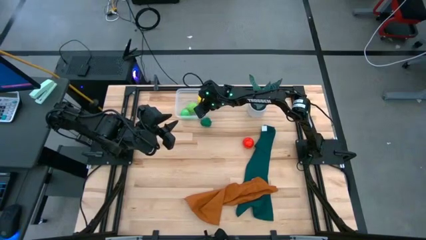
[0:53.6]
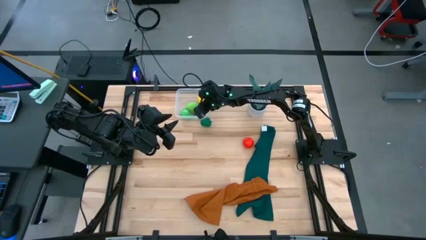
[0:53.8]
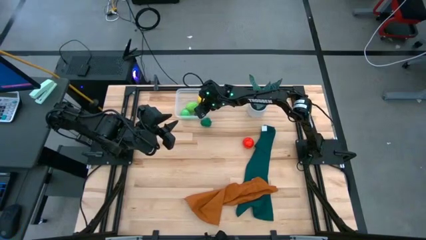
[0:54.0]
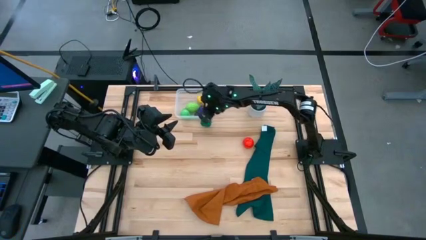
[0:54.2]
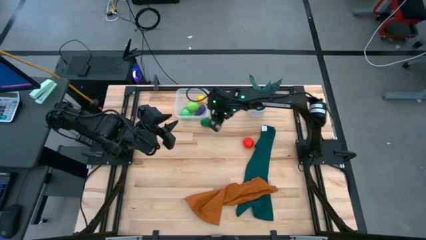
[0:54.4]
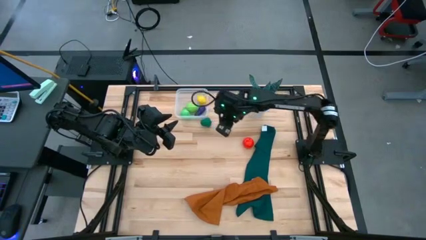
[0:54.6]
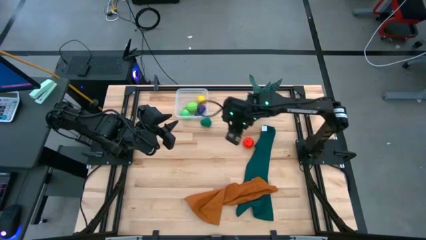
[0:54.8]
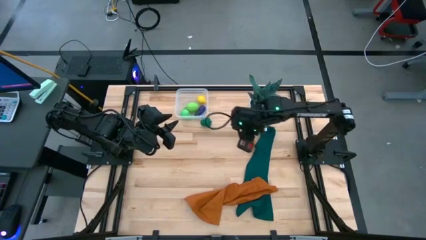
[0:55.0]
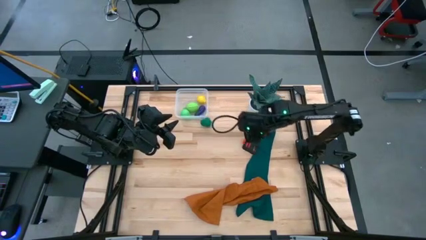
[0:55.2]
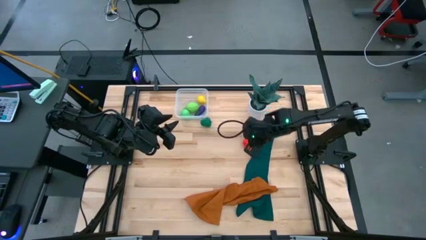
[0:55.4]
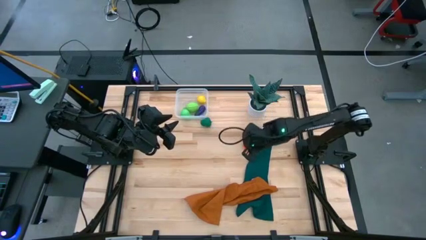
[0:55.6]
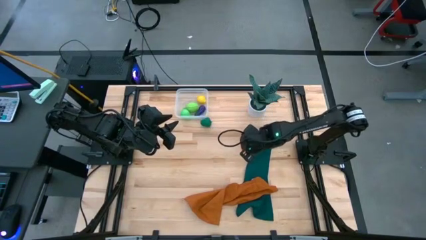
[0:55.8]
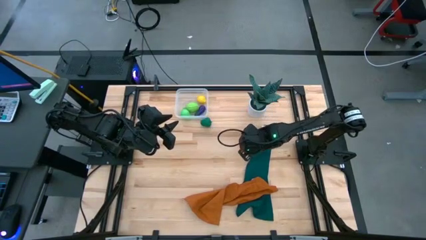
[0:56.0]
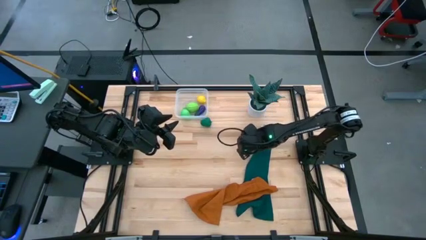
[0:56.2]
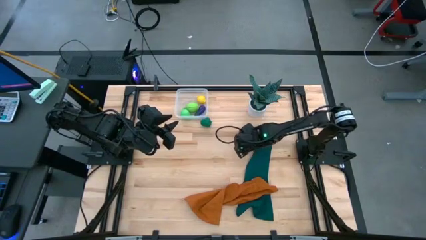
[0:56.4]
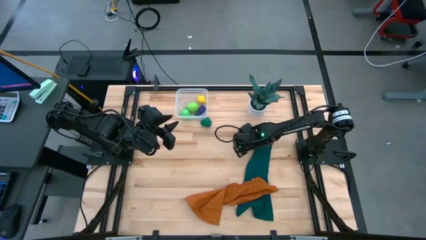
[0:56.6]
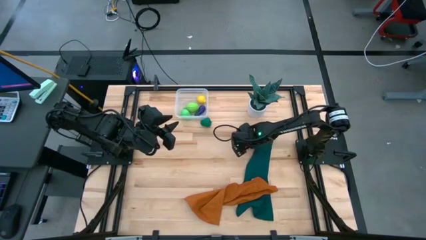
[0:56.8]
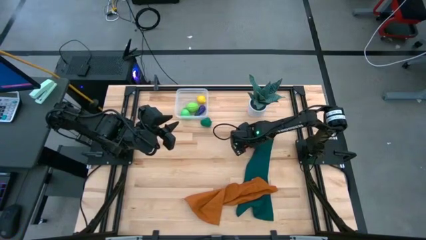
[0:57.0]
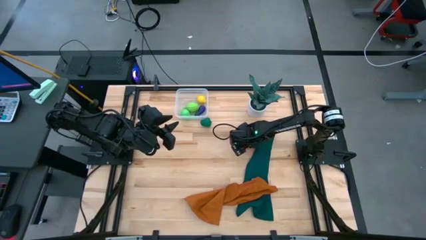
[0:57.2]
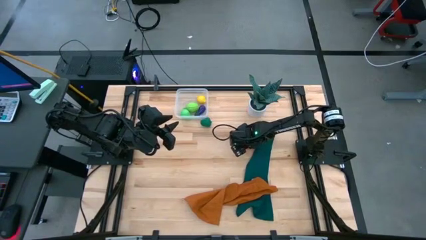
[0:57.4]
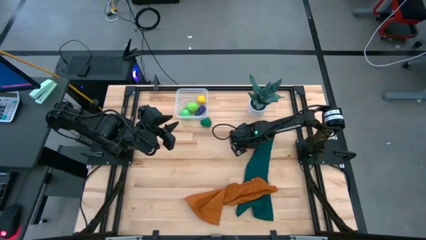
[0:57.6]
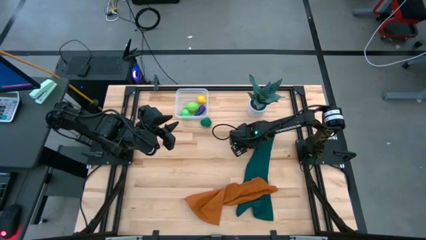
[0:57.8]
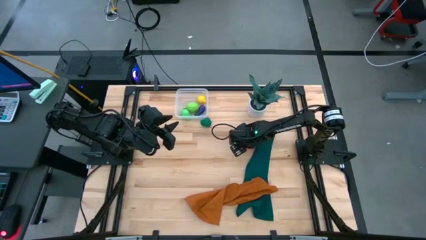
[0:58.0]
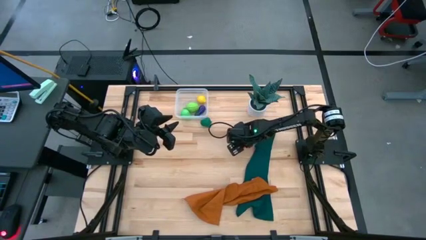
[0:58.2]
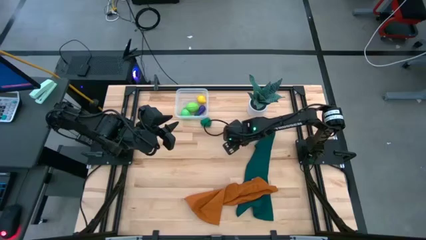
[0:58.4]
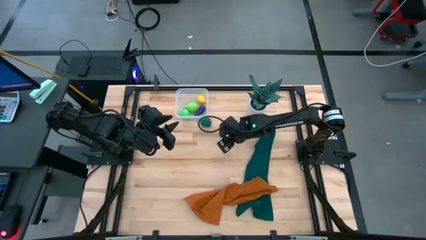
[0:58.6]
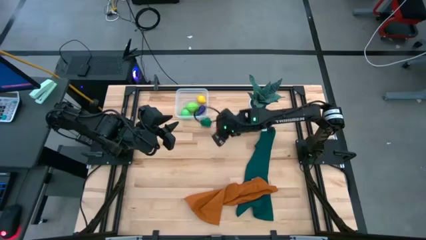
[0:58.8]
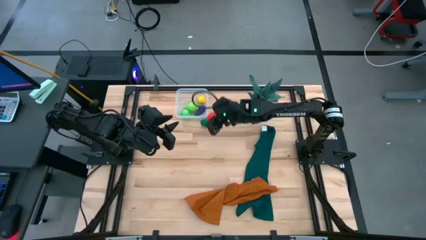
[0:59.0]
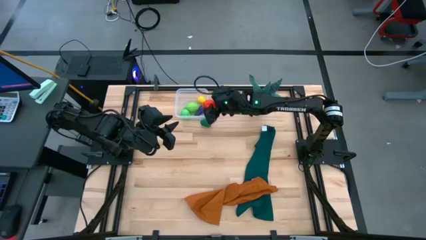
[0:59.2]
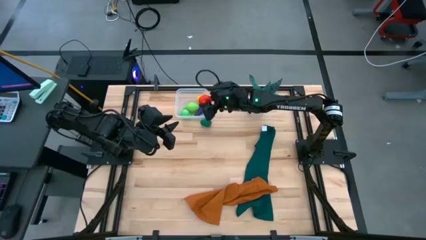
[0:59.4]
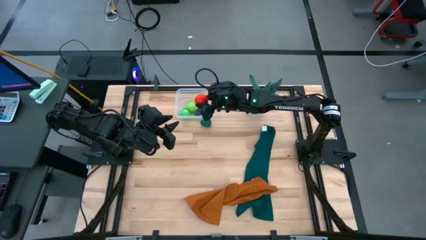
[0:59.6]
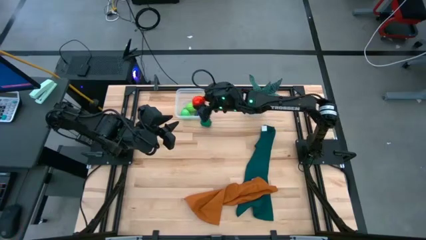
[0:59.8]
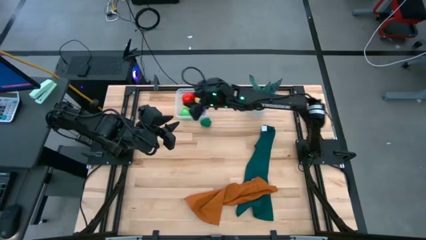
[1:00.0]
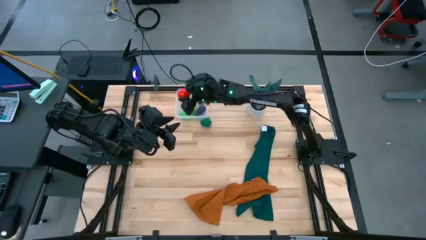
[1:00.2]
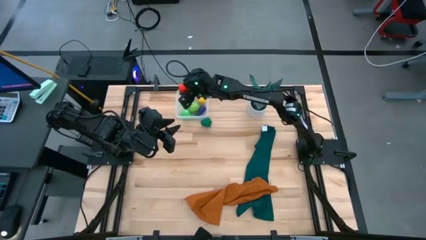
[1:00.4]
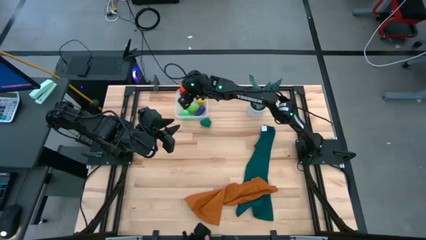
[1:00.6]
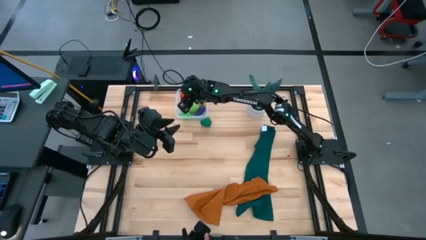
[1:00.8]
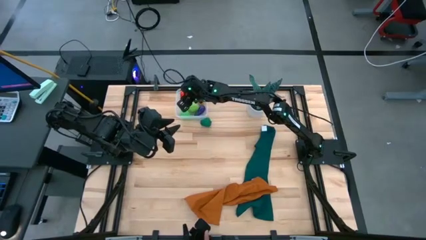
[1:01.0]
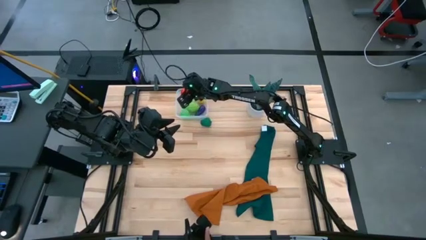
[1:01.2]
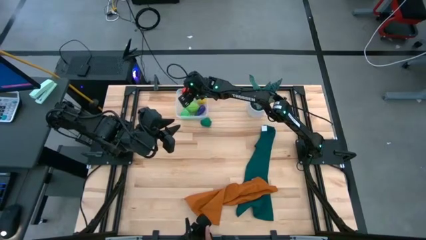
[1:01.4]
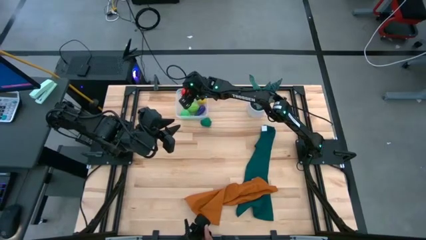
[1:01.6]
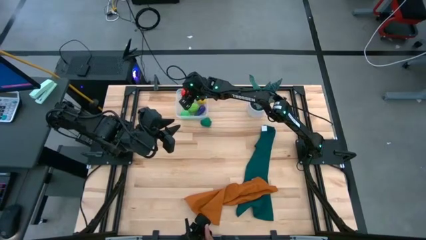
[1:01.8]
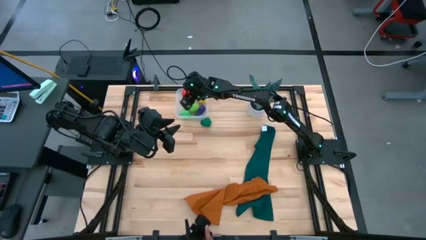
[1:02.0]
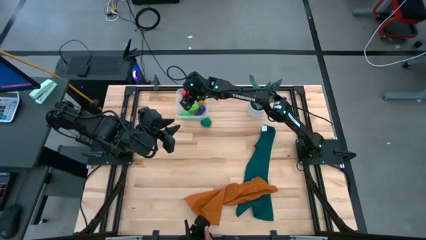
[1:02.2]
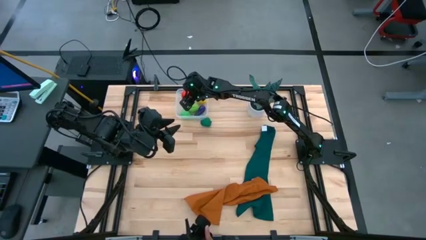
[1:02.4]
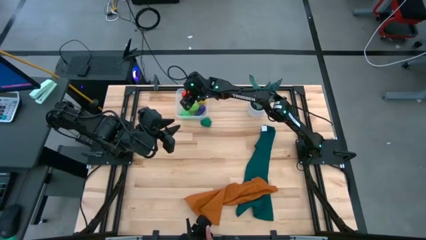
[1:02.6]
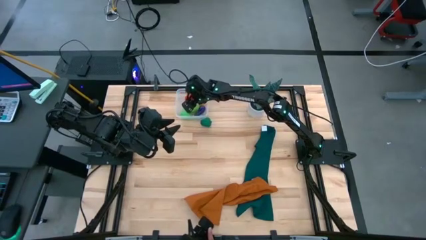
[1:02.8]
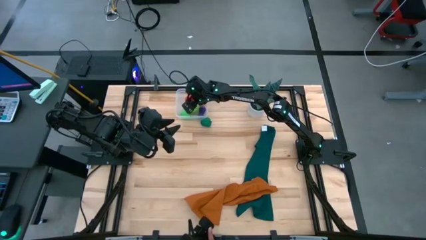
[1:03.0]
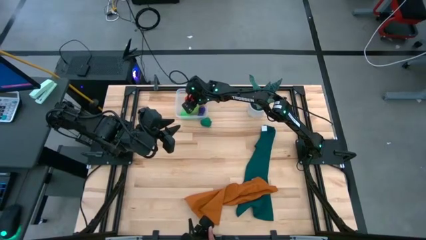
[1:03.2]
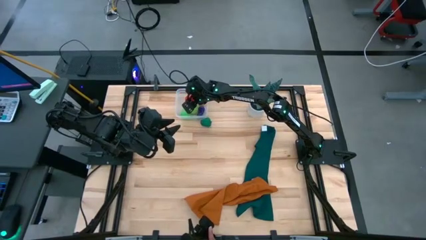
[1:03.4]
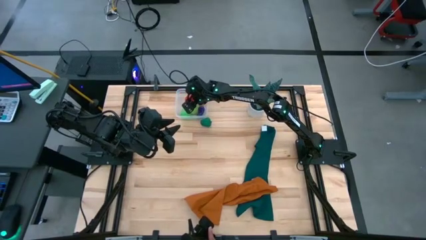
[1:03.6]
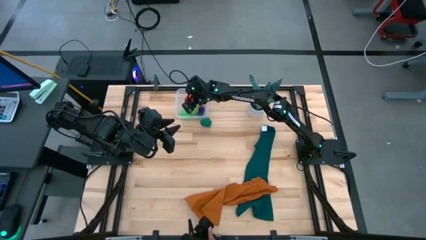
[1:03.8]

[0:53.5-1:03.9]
Task: Pick and placing Produce into tupperware
Put the red tomato into the transparent bin

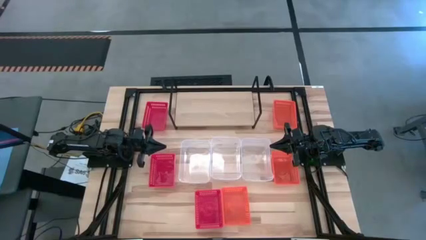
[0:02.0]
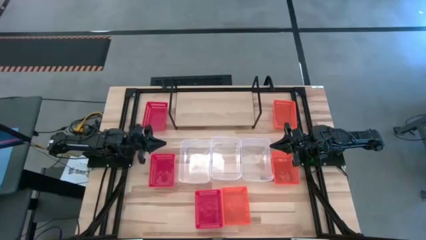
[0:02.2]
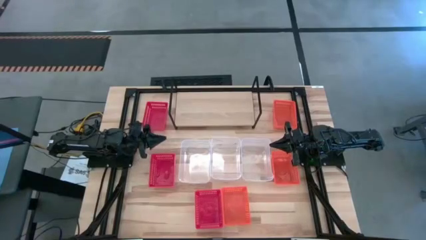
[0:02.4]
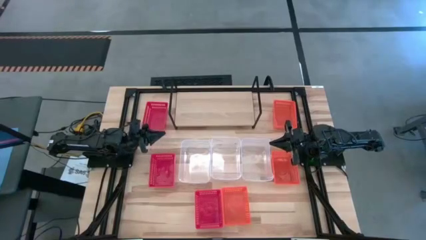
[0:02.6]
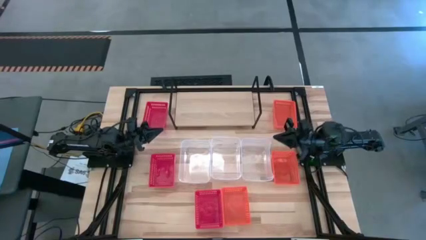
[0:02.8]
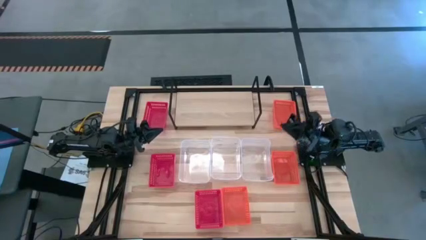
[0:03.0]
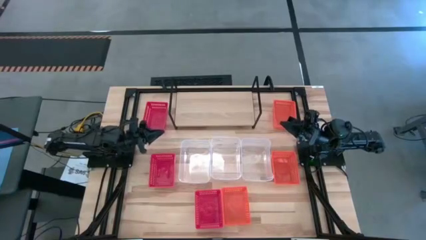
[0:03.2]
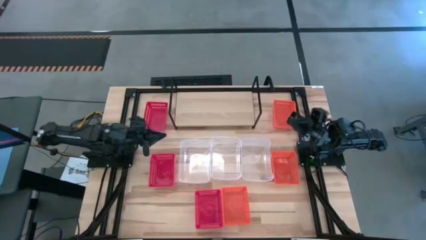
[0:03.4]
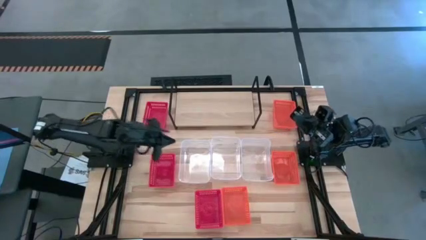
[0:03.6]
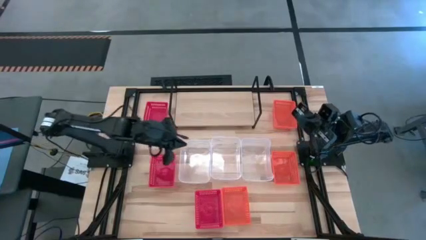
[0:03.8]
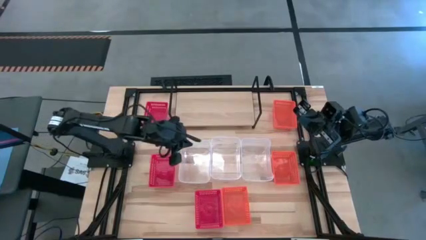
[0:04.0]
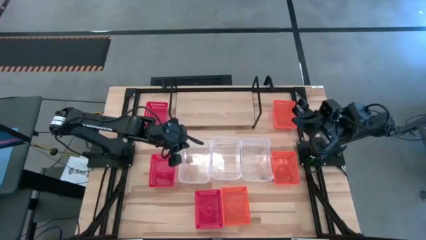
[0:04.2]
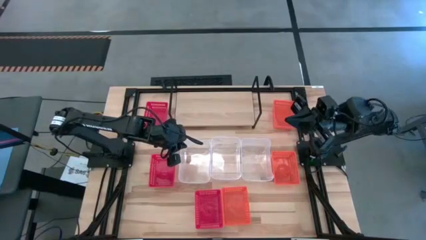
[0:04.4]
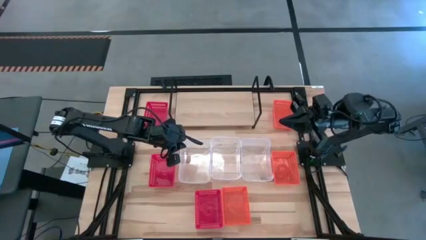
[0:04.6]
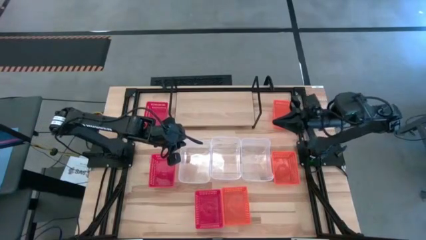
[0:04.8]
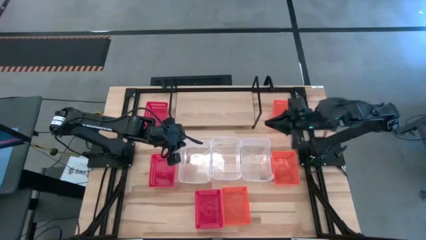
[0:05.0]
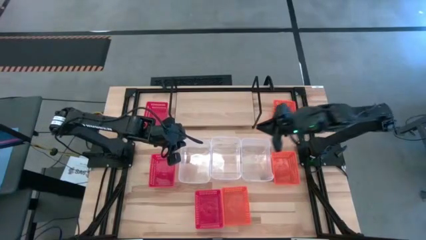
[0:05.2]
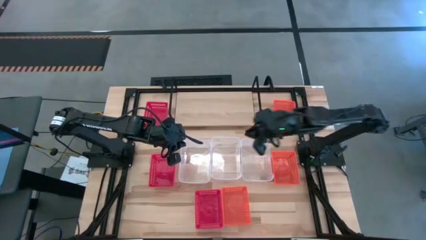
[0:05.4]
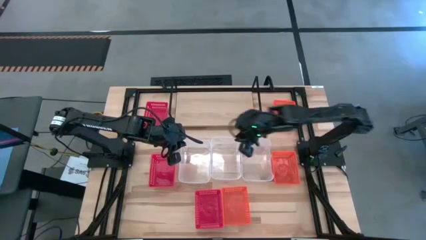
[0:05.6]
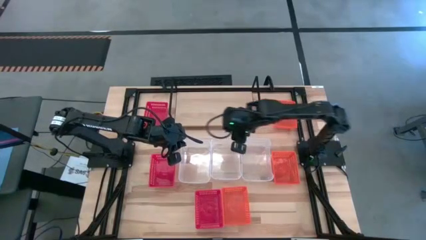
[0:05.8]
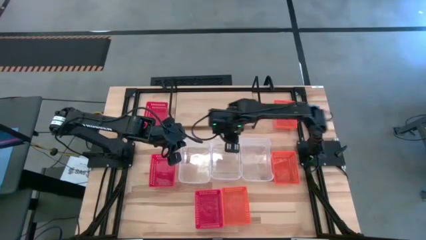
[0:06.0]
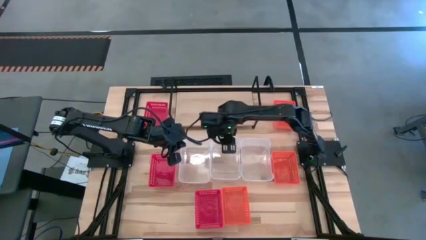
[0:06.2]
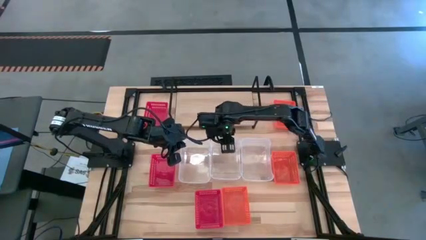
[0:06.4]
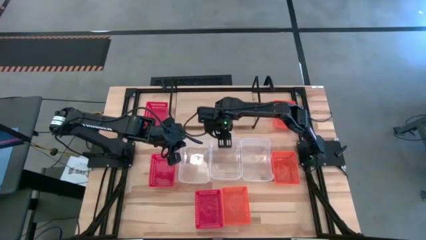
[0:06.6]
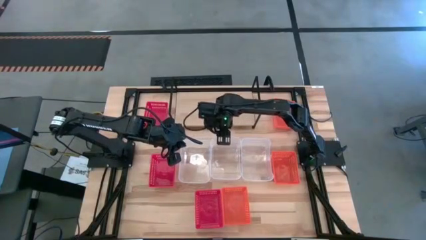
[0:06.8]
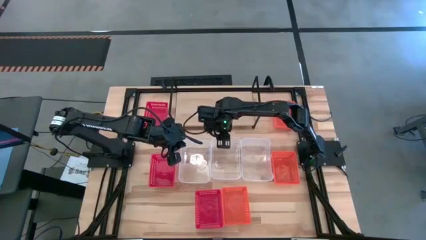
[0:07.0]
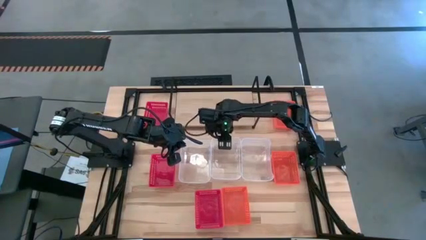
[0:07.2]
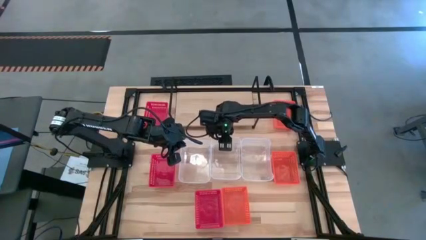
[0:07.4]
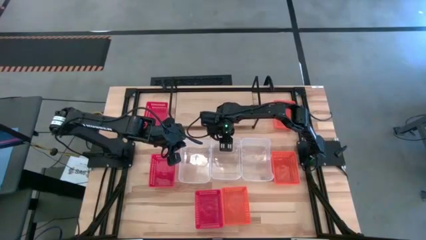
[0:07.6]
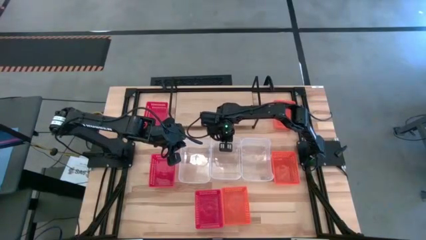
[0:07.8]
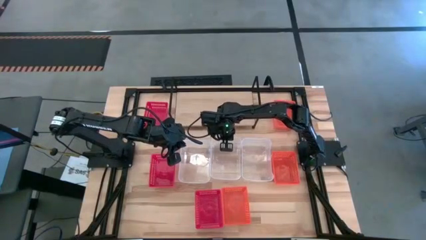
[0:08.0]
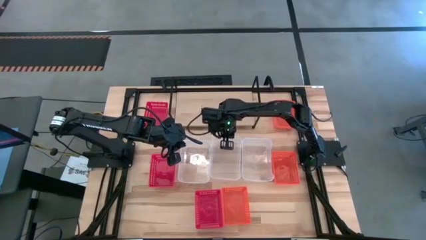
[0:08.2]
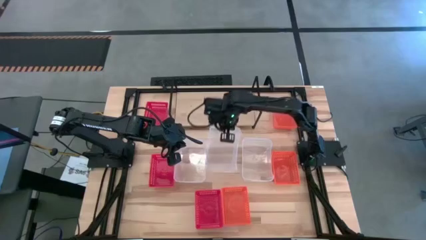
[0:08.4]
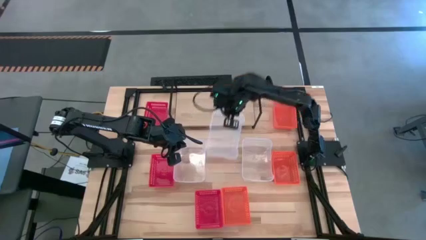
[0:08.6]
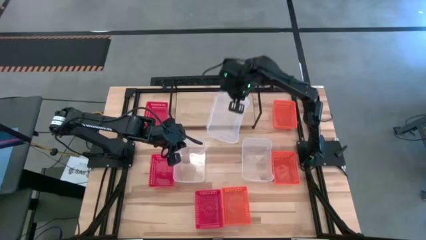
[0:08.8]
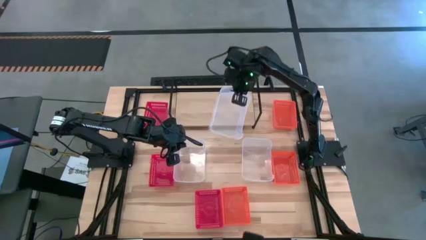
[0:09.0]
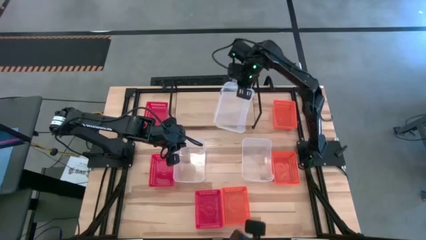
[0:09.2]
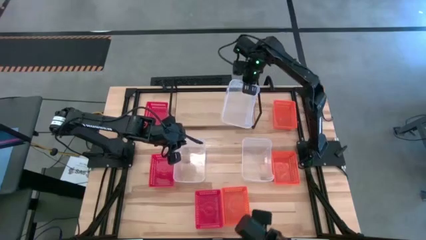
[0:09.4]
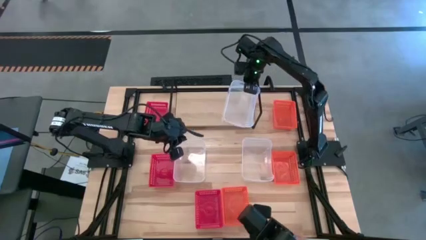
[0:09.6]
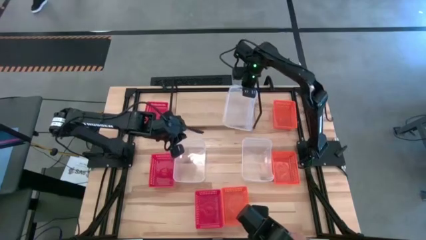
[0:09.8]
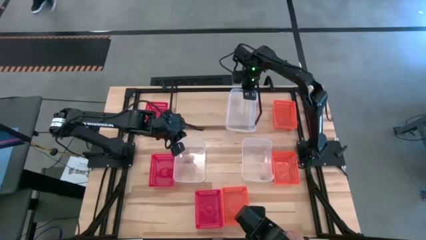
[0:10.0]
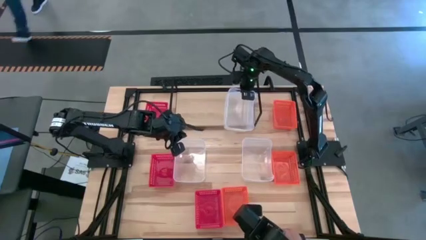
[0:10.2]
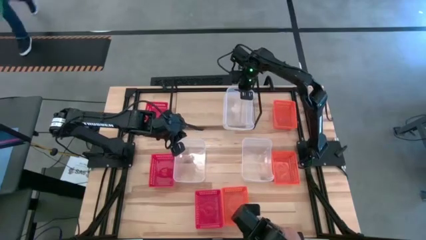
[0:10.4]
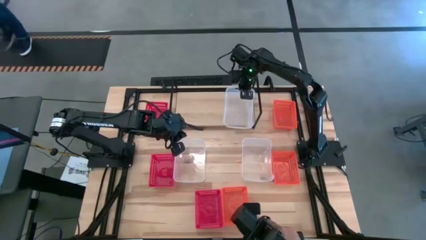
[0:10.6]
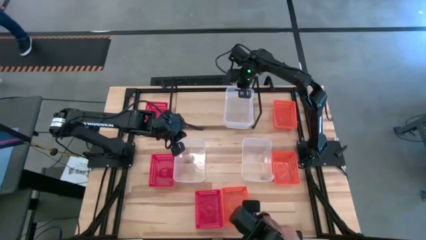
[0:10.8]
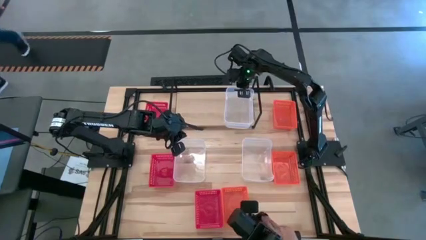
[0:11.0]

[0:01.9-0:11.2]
Task: Stack baskets on shelf by color
Put the middle white bin on the the shelf
